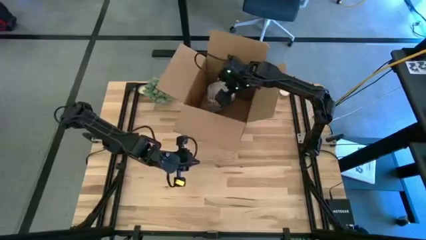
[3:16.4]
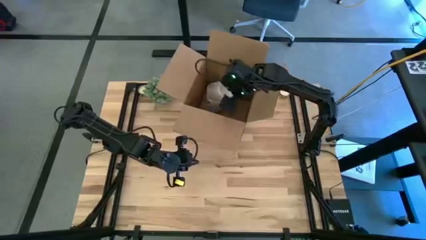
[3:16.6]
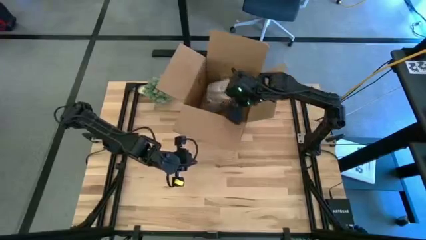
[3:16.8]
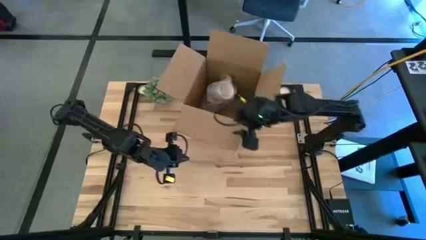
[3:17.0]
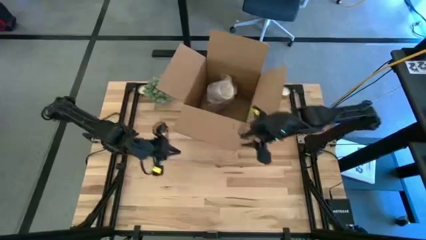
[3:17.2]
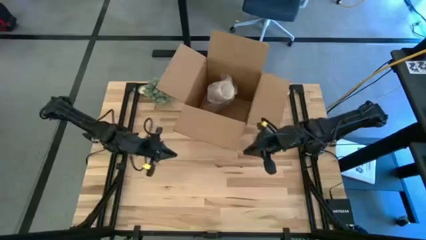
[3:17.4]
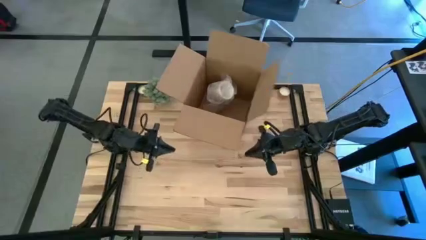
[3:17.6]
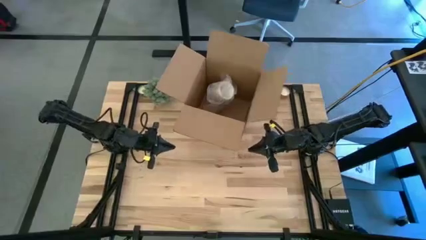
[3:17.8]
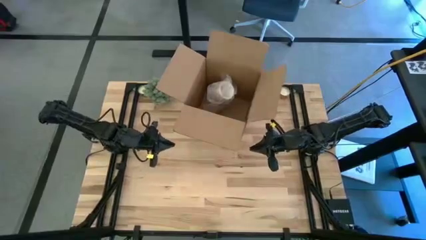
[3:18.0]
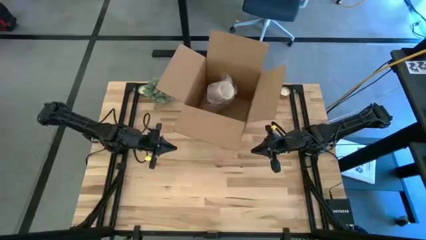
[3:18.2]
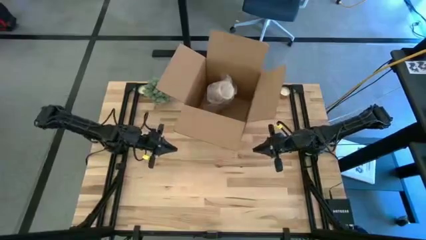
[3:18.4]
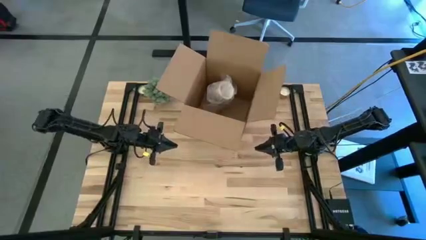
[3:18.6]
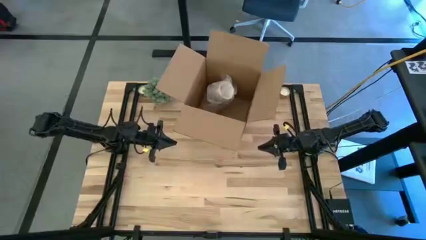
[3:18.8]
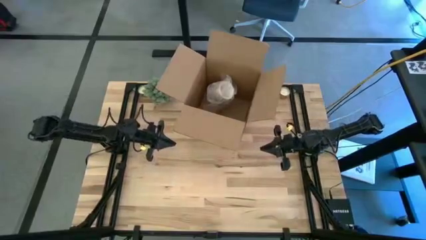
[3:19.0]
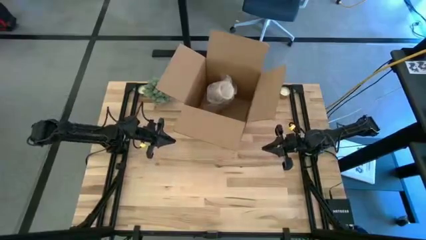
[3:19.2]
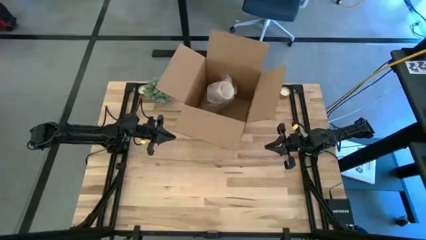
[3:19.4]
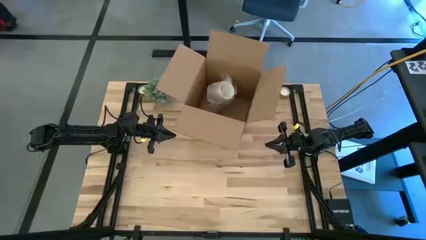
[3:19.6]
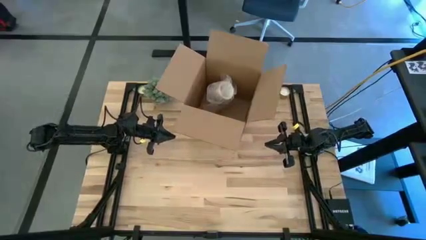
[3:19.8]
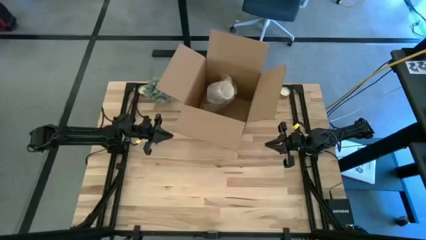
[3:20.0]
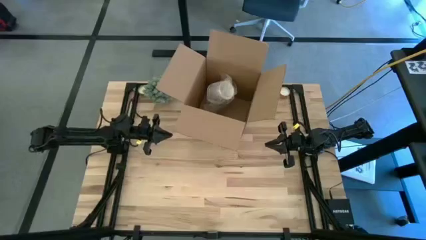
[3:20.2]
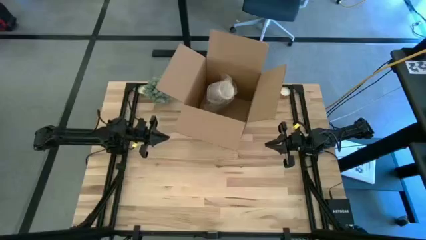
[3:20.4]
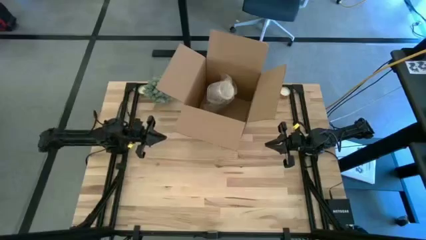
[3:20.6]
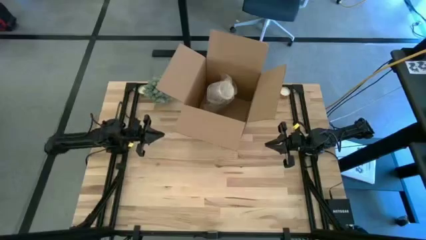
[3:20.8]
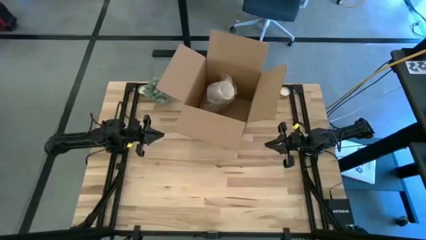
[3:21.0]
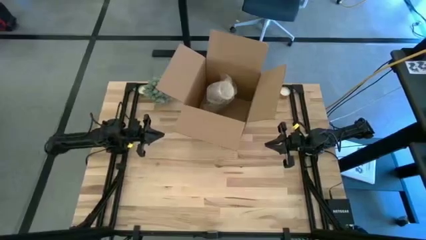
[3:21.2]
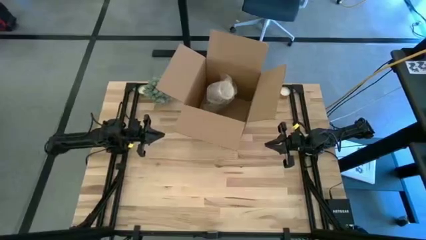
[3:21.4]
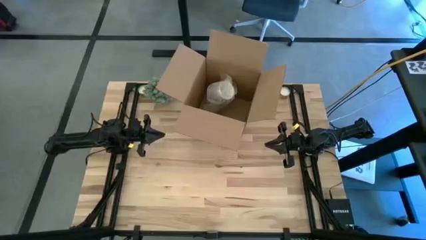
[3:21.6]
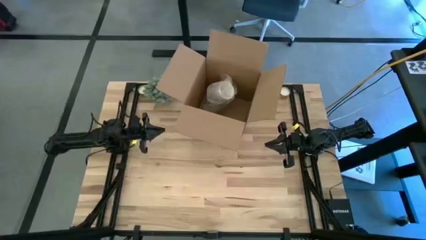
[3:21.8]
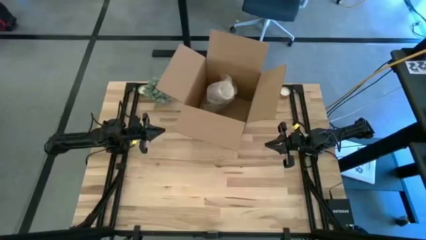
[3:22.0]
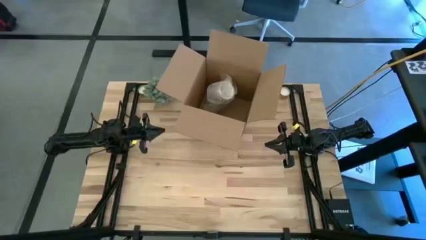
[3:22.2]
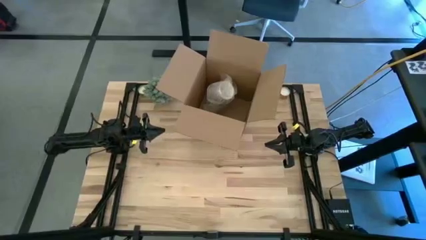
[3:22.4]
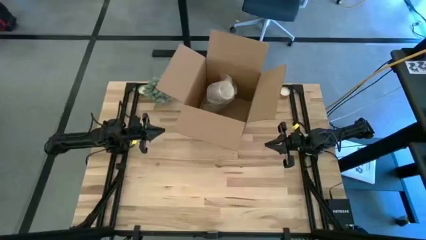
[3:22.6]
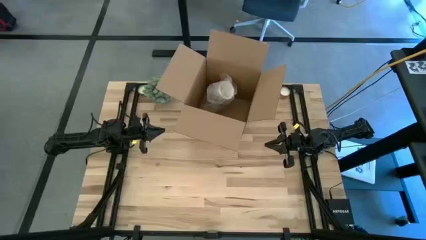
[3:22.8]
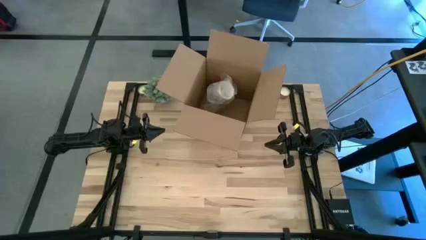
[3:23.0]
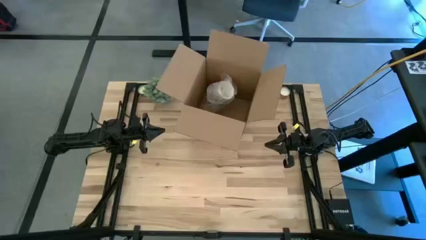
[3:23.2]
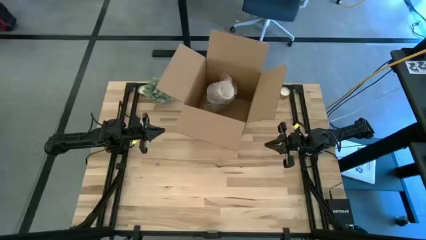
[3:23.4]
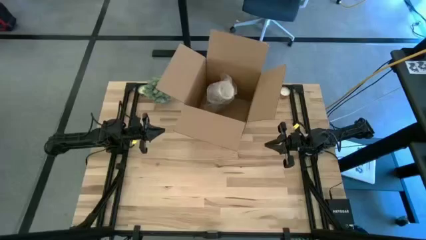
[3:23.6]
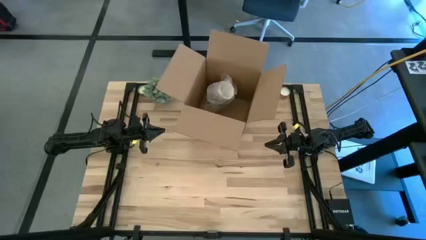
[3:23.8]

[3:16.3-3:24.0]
Task: wrap mug
Return to Home Position

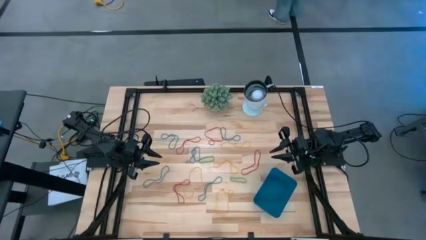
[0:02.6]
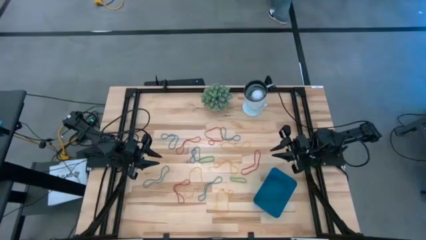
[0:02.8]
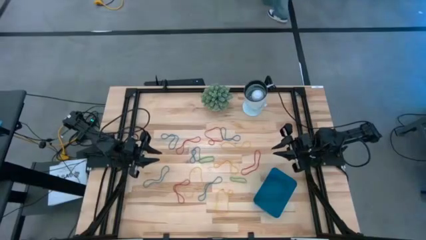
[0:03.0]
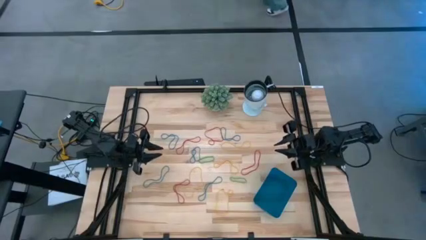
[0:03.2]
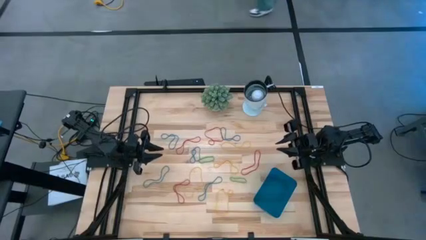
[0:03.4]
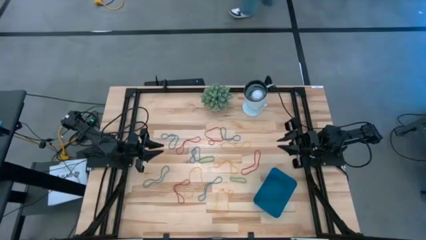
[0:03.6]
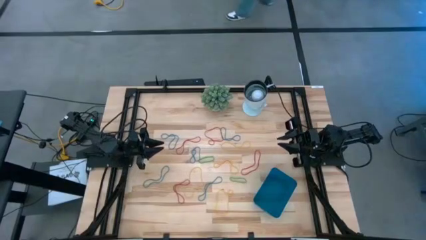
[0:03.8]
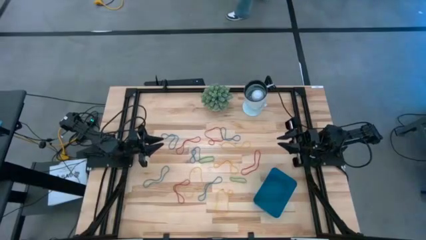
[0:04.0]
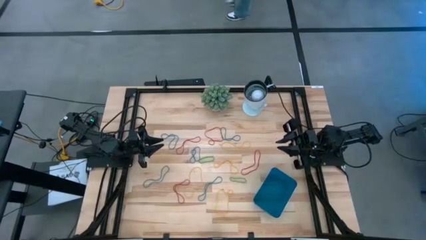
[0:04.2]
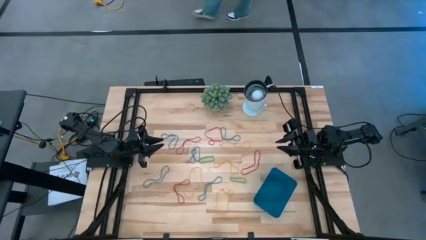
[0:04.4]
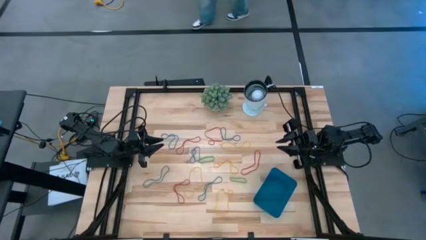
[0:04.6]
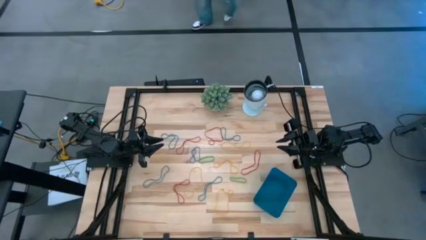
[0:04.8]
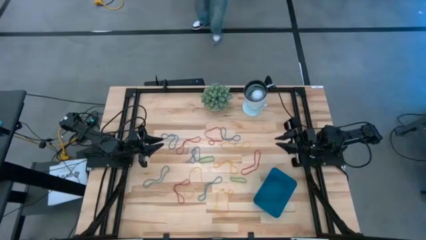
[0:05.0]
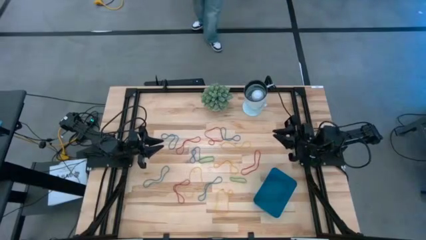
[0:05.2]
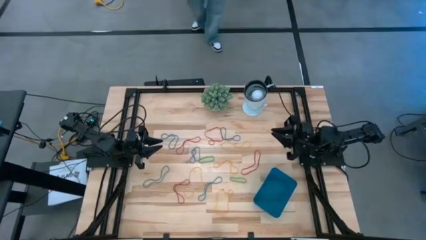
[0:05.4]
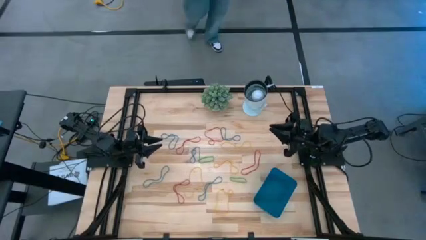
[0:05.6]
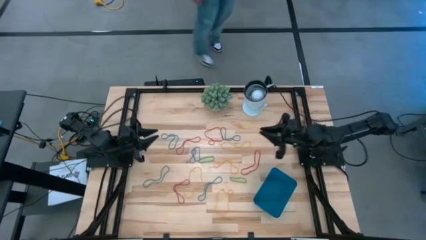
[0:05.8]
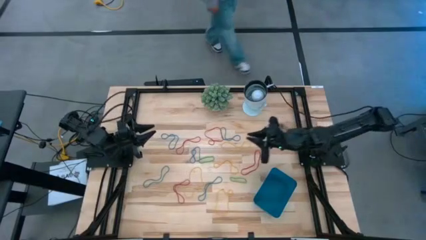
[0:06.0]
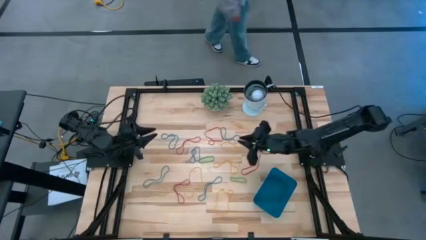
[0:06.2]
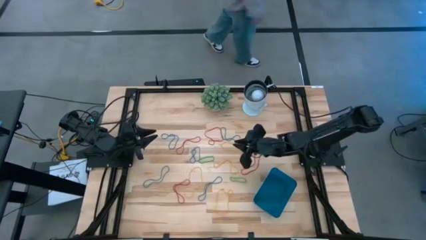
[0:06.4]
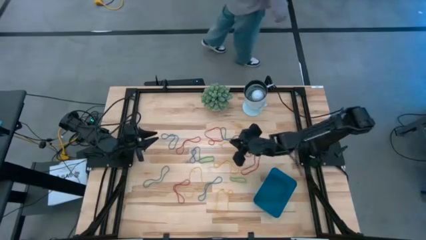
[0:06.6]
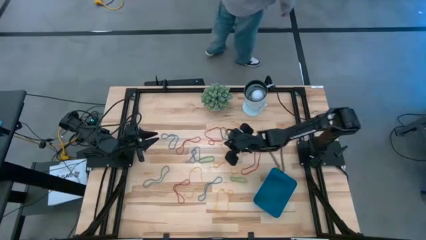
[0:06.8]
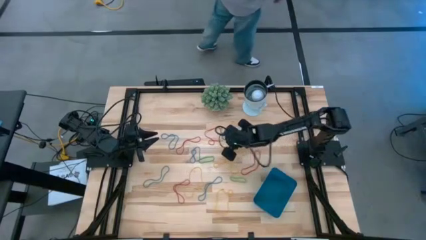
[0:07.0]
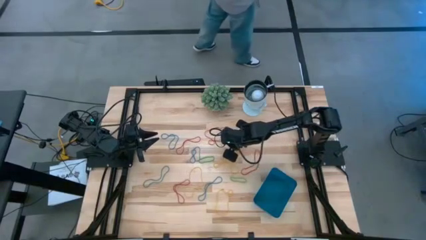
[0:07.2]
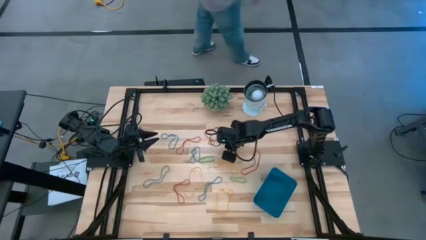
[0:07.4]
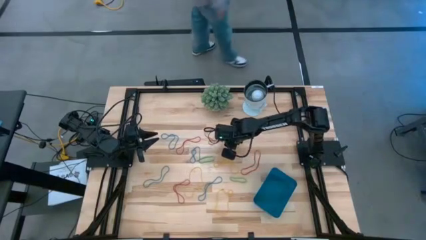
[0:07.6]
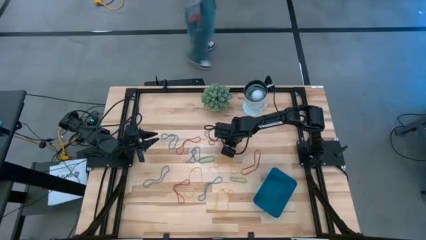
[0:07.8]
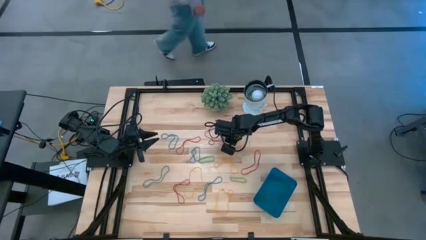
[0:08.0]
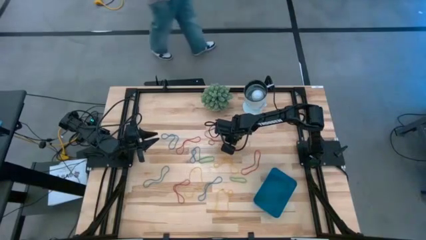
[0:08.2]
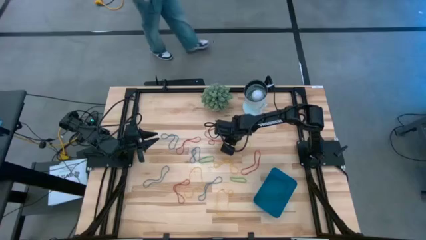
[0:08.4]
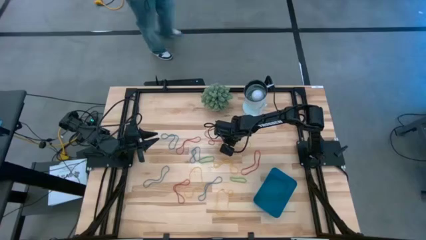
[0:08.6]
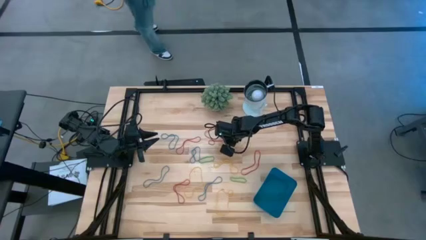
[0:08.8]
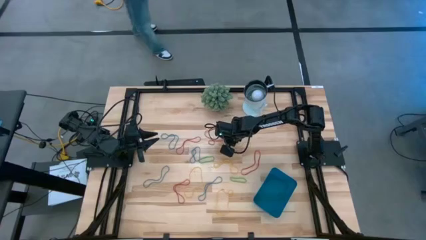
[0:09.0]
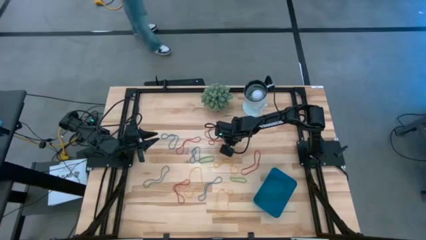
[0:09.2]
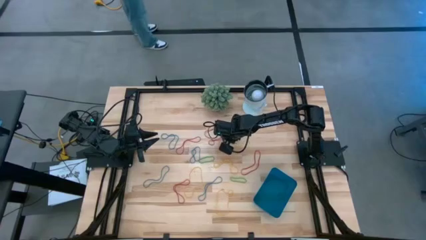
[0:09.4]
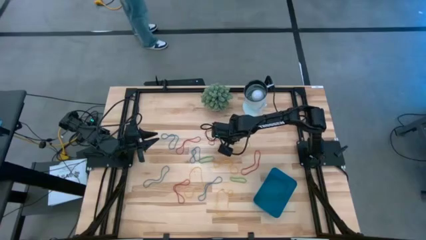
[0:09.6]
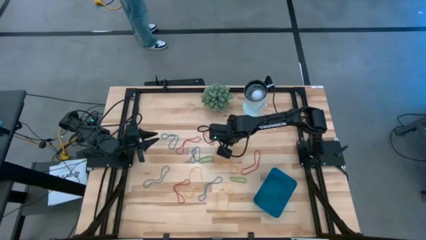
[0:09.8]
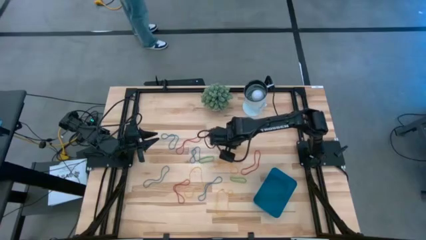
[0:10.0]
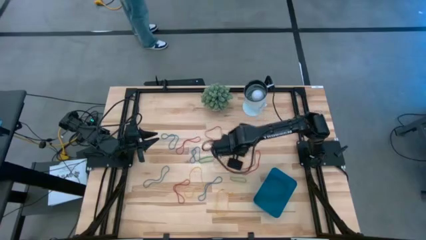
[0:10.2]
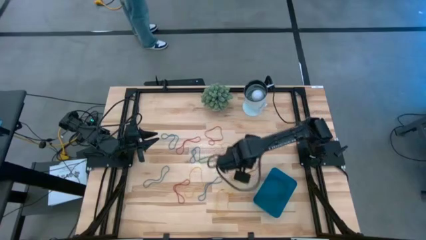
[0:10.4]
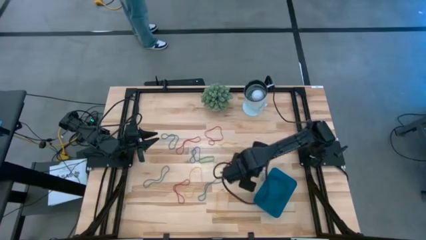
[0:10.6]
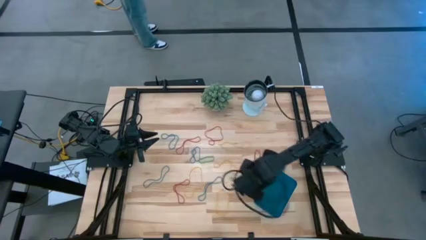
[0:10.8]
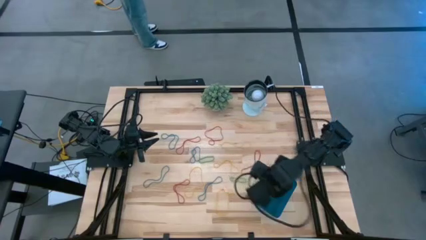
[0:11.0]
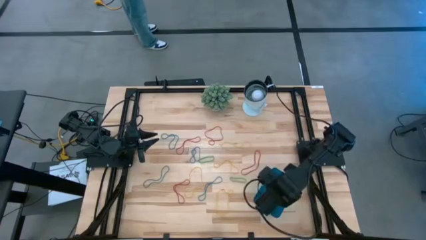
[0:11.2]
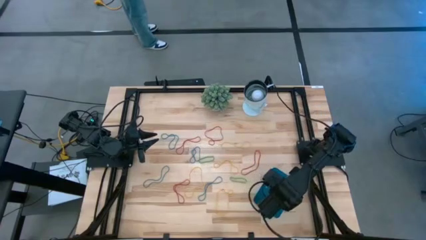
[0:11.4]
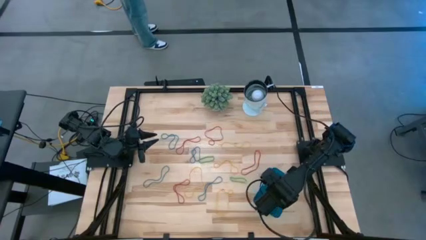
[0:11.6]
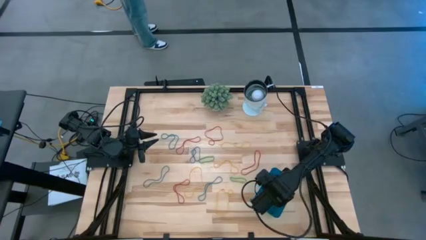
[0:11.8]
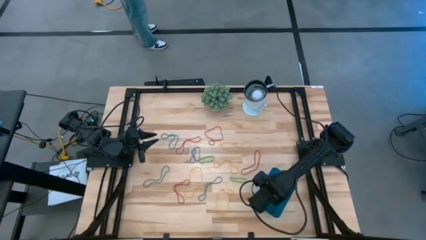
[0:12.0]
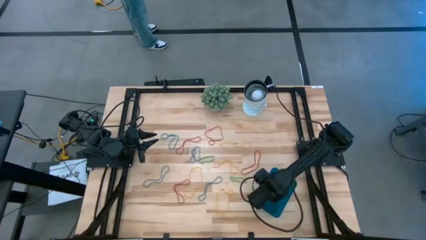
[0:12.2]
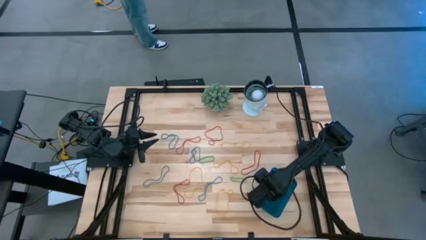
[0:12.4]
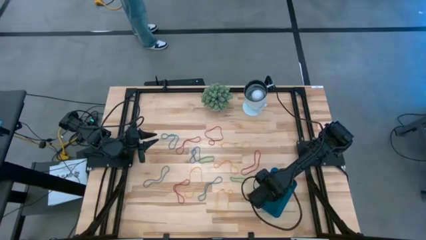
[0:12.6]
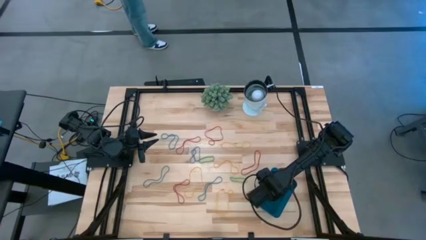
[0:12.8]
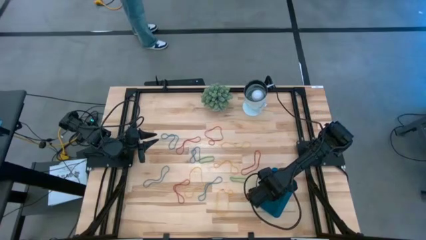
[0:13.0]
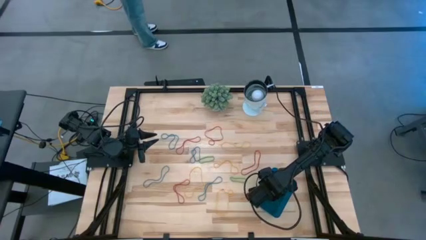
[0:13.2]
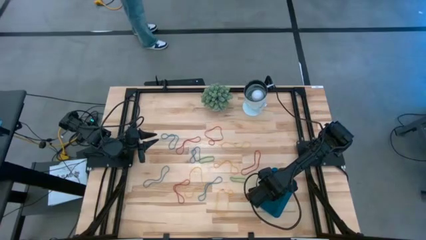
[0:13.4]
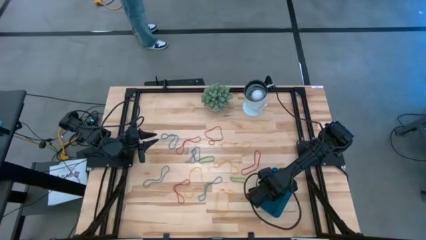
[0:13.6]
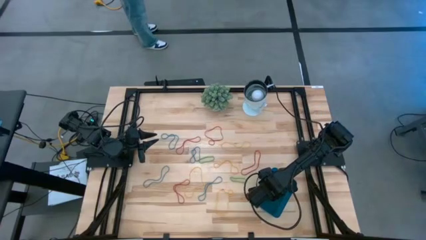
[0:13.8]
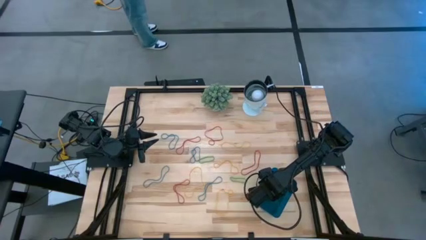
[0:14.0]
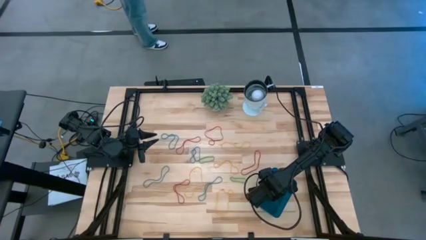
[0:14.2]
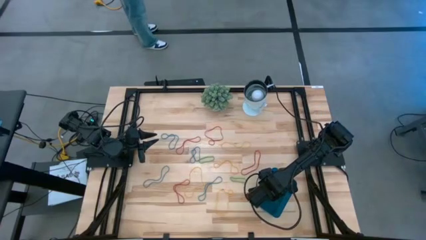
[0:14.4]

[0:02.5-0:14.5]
Task: Pick and place items into bin
Put the blue rubber band into the blue bin
